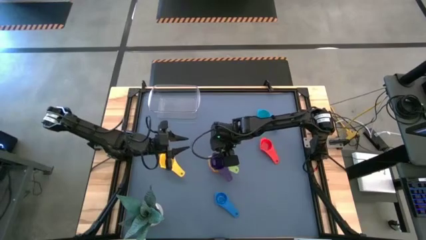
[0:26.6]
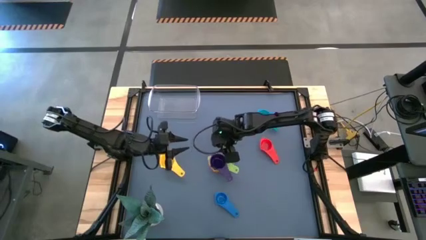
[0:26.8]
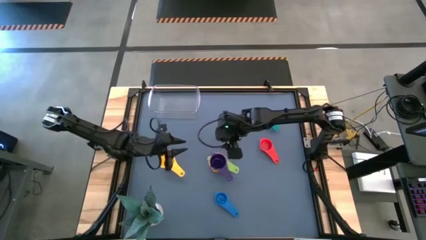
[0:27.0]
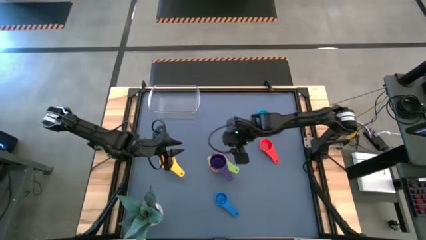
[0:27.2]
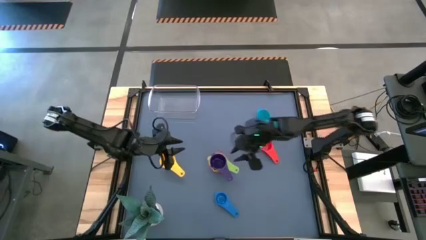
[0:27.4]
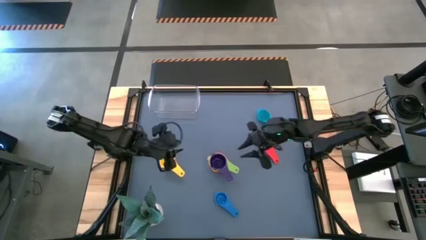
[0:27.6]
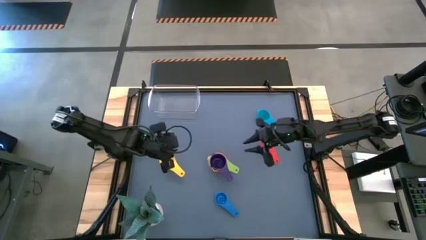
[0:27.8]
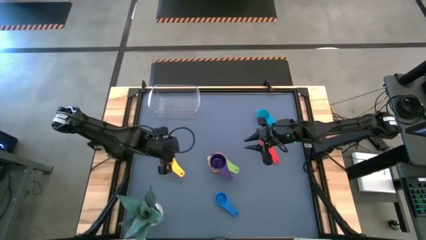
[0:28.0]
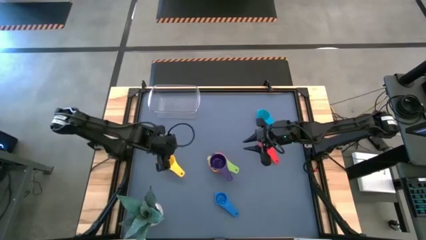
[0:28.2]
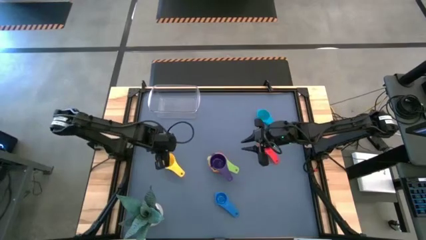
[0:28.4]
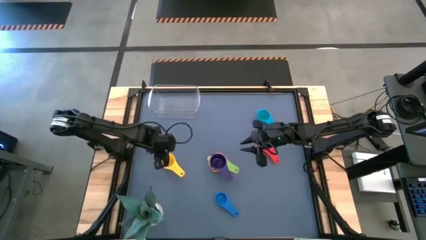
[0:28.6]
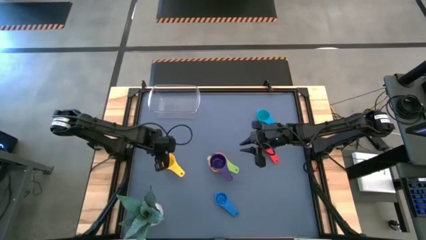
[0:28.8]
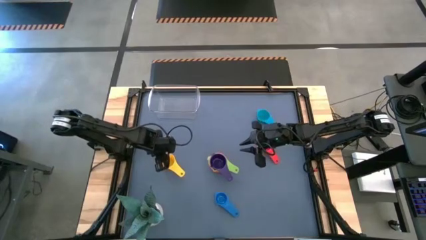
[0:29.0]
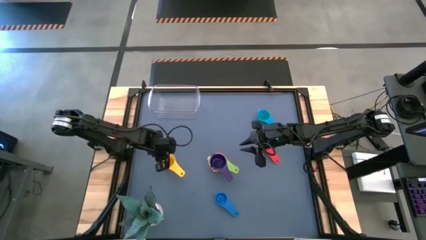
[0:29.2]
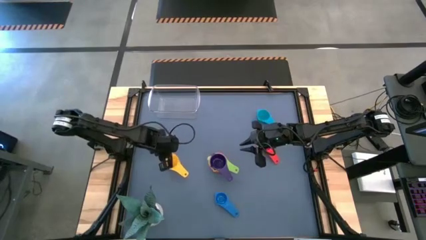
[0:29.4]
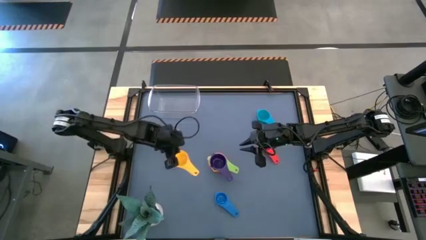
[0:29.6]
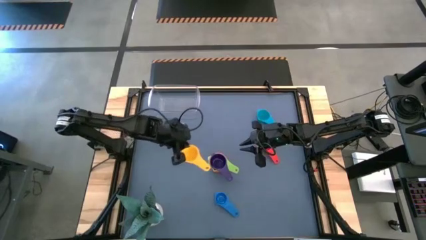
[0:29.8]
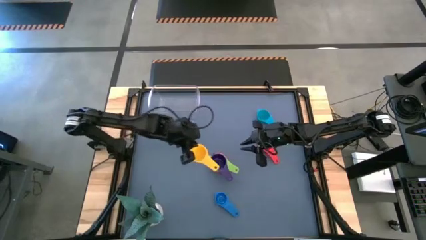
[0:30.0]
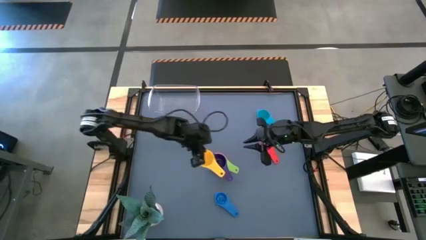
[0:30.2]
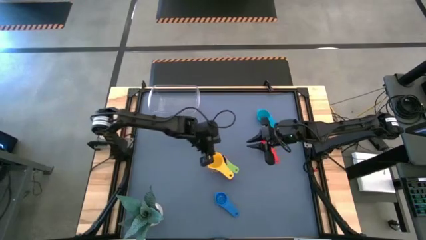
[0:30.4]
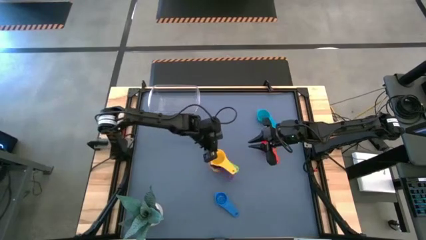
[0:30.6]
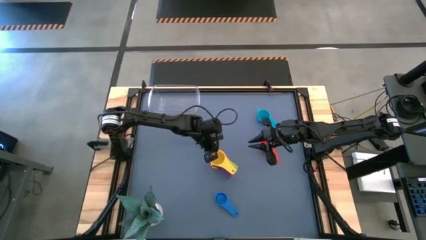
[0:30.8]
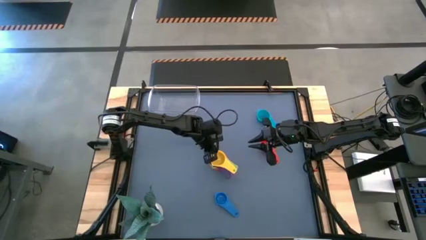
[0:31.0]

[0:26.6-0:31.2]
Task: Nest measuring cups in basket
Stack the yellow measuring cup on top of the violet measuring cup

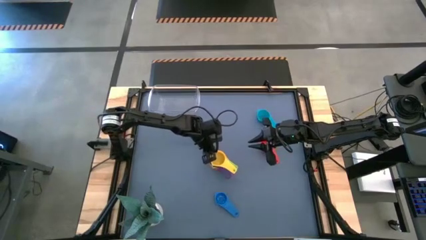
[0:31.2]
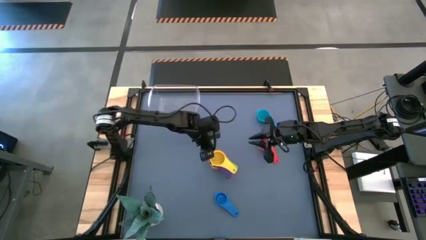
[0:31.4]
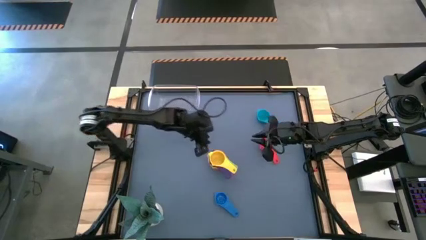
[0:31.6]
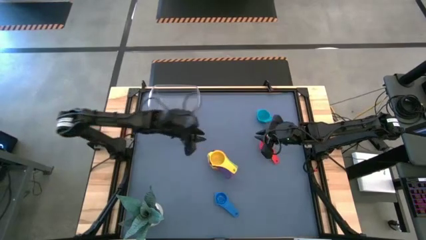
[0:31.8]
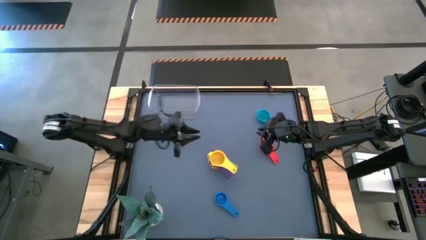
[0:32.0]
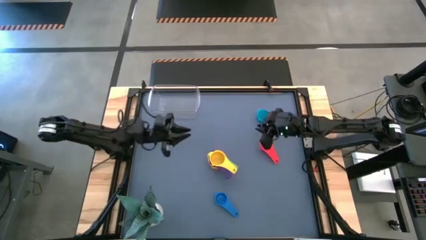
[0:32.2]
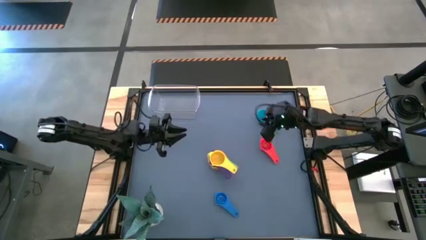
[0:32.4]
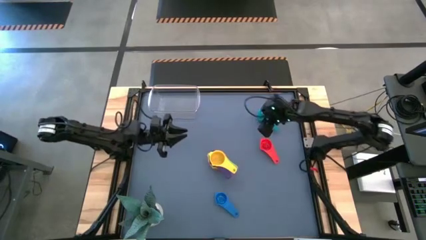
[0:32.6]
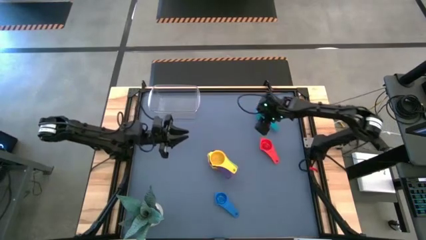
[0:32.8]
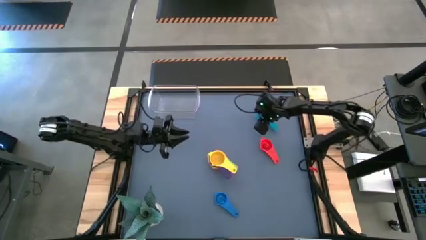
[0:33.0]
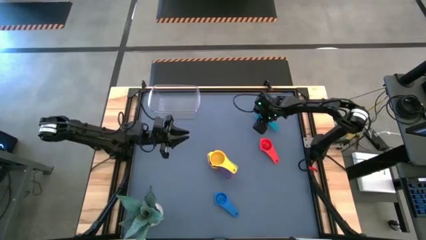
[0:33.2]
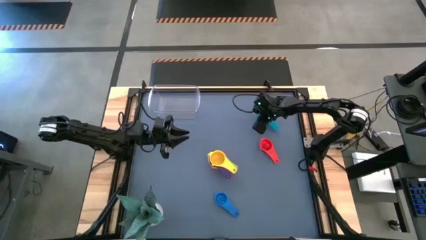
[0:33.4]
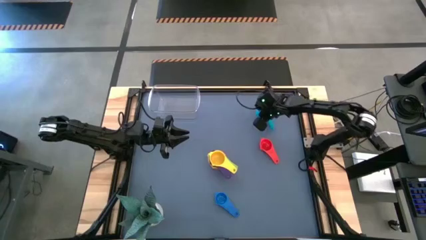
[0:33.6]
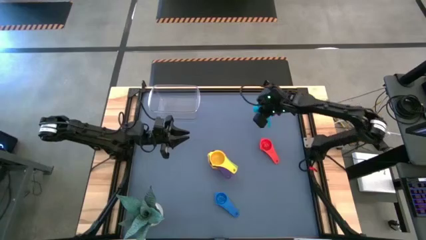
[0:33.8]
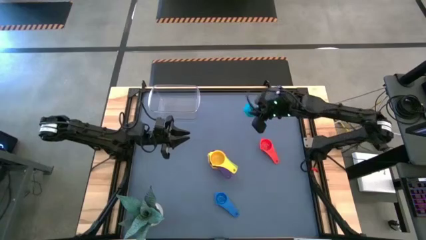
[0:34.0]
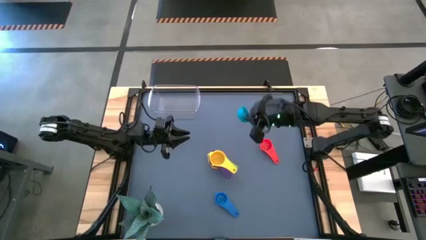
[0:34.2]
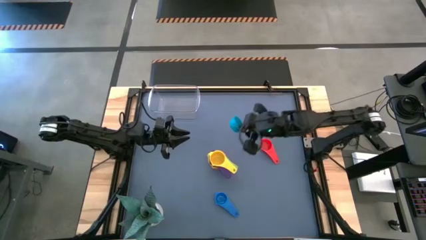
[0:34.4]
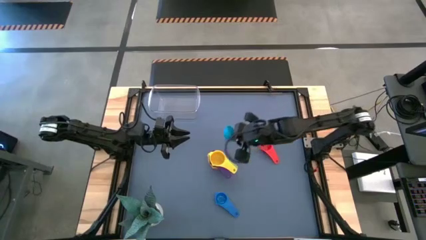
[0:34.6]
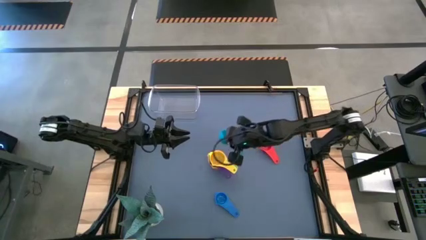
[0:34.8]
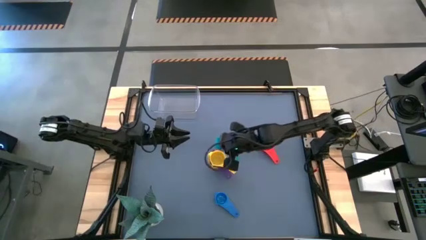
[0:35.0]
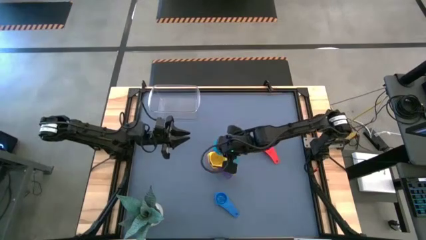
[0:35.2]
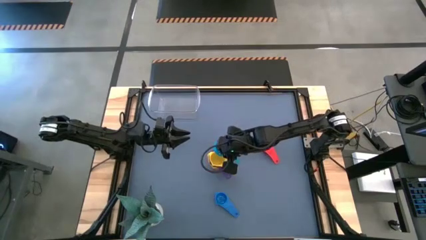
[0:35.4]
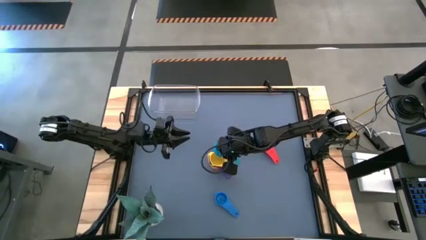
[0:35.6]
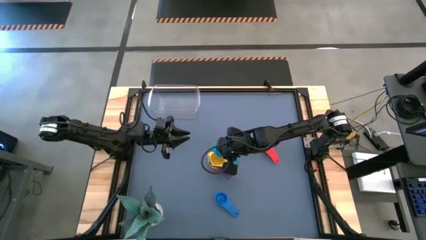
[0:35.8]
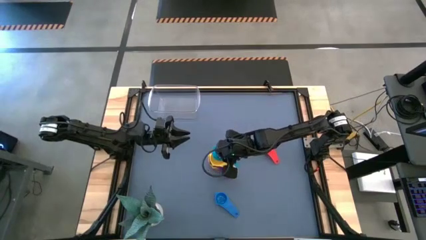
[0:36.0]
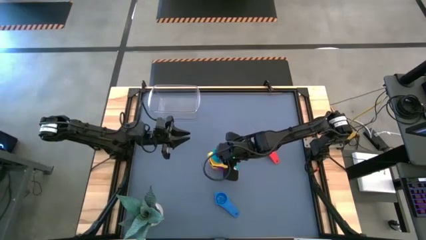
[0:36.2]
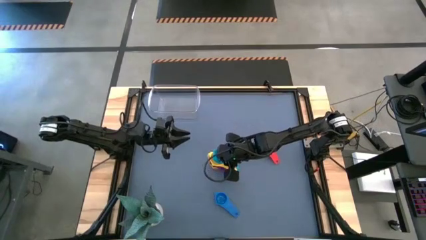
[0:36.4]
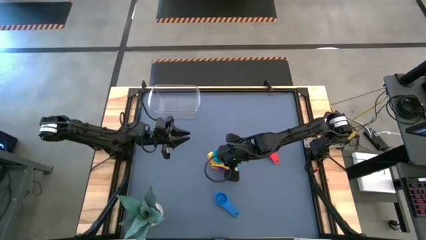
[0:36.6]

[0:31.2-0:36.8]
Stack the light blue measuring cup on top of the yellow measuring cup

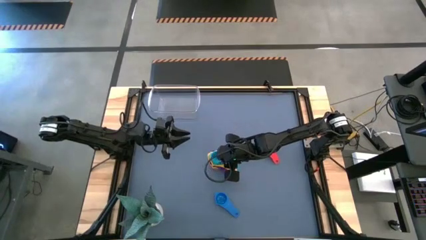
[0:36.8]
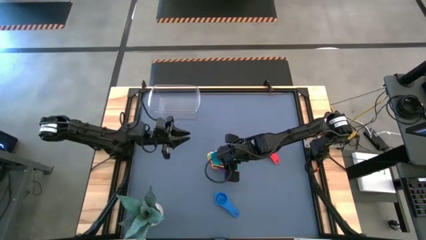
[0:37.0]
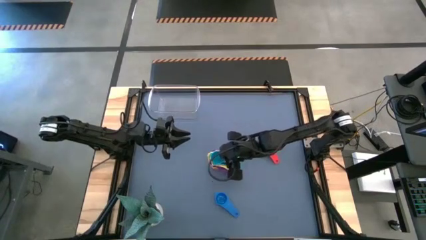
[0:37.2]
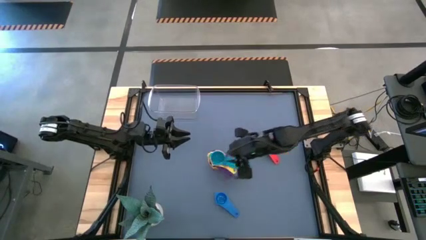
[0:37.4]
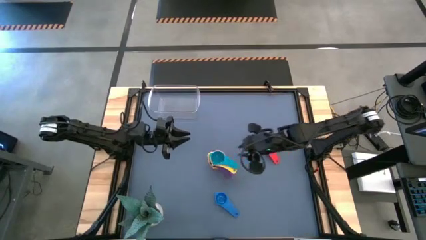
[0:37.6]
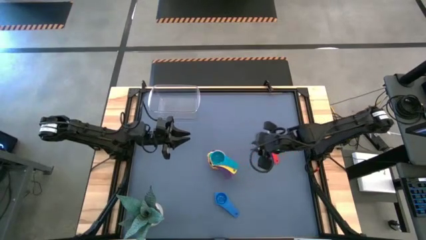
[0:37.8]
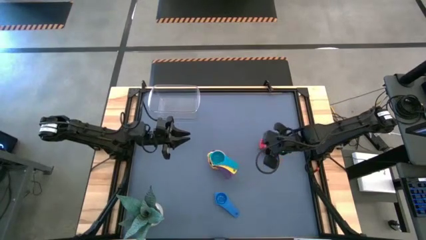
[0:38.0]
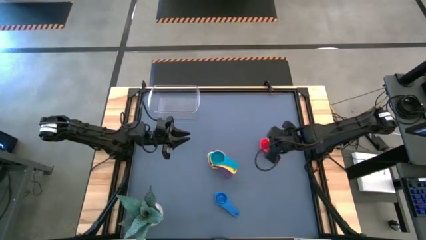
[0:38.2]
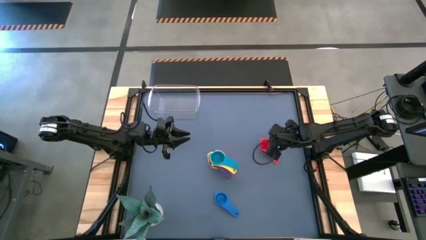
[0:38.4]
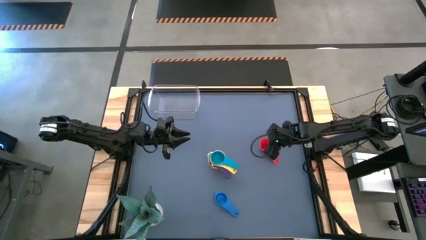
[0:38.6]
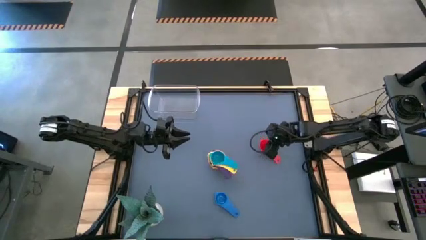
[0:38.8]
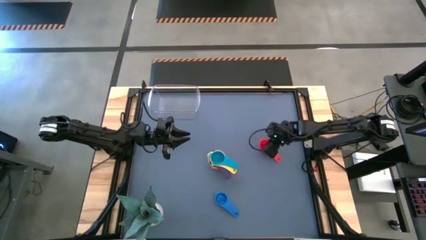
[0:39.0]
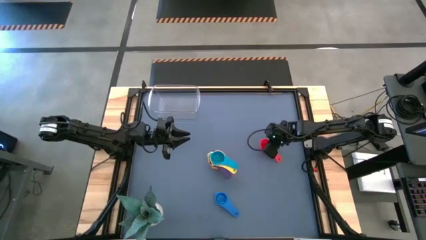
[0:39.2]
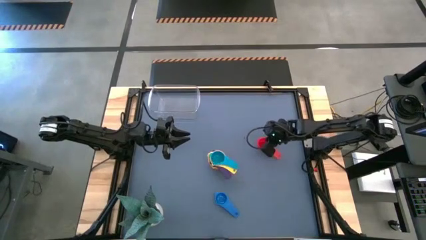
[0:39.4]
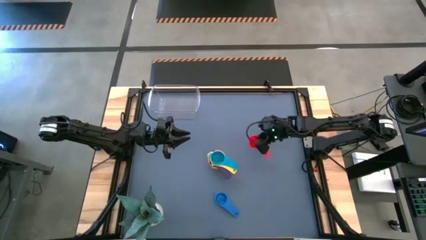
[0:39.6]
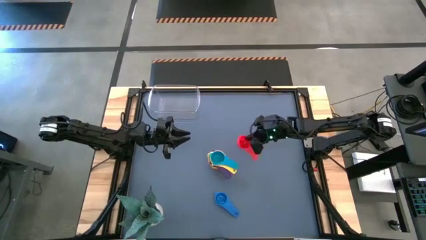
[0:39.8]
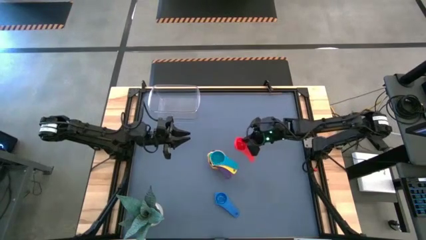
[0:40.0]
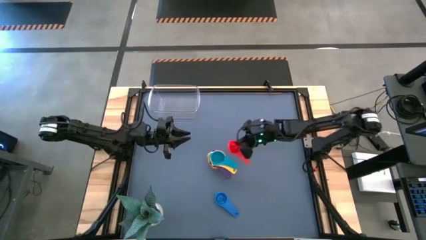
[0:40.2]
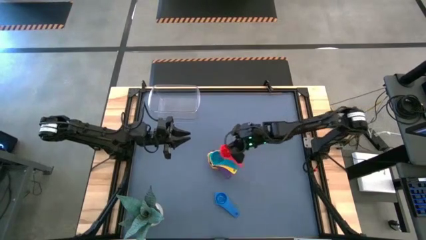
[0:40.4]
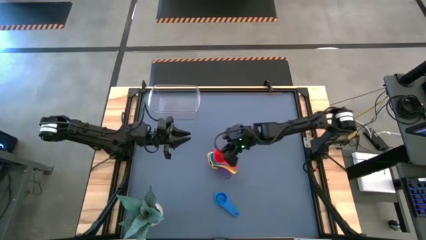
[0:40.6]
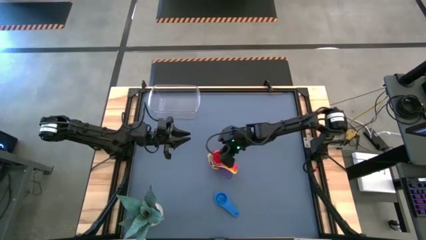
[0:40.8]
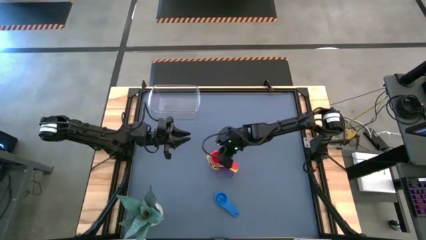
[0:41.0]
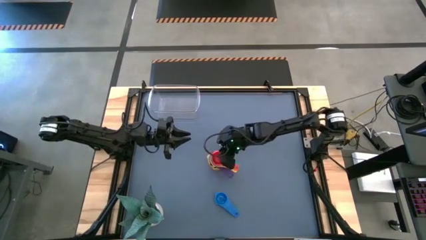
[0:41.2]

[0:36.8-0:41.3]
Stack the red measuring cup on top of the light blue measuring cup

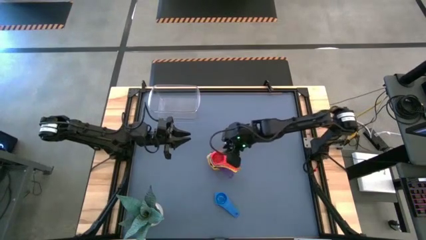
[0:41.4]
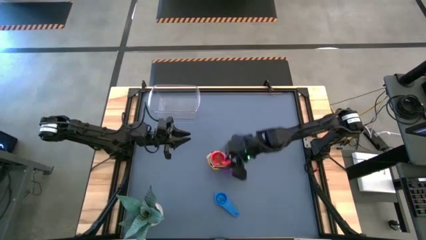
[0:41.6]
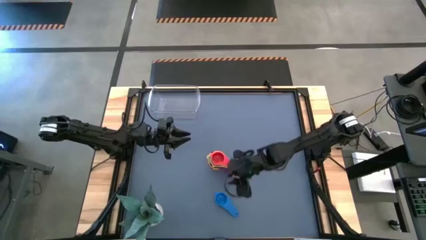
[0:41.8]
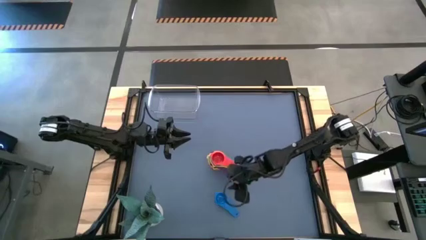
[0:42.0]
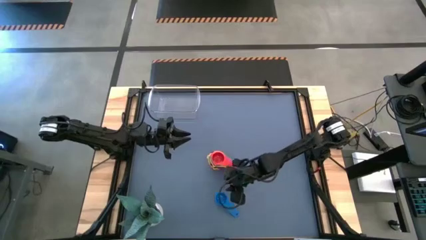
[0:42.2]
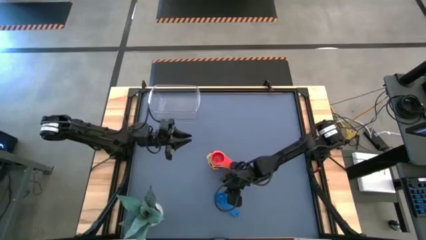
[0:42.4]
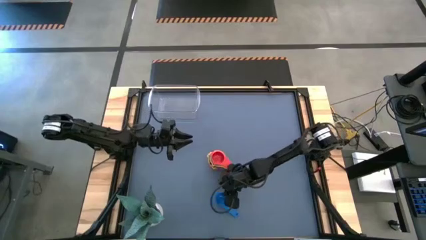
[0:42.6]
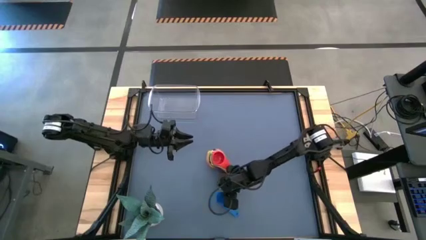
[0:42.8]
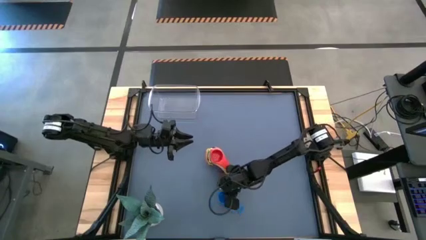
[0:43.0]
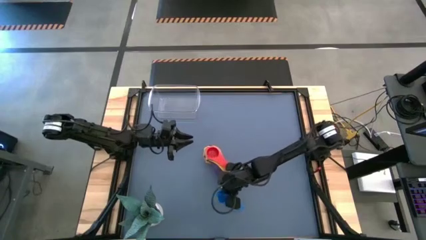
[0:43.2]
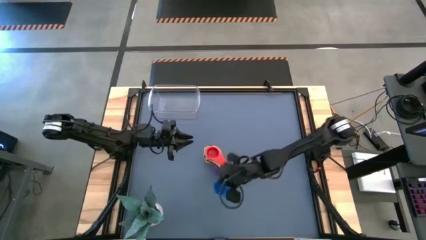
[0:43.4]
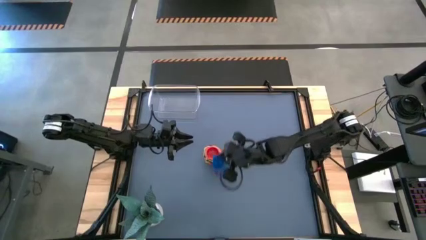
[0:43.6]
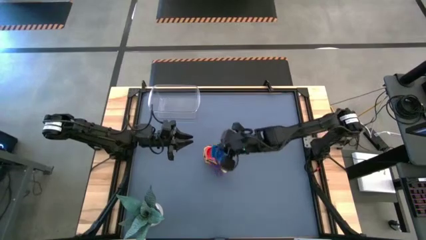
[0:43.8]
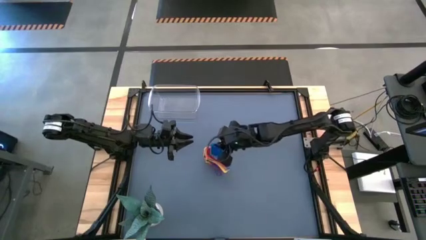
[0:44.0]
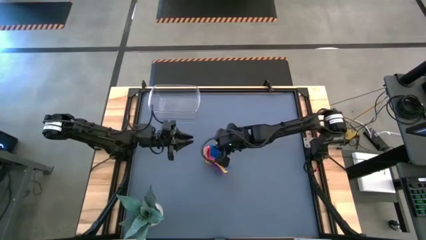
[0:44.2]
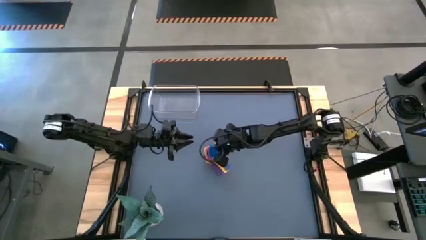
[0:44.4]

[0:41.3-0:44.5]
Stack the blue measuring cup on top of the red measuring cup
